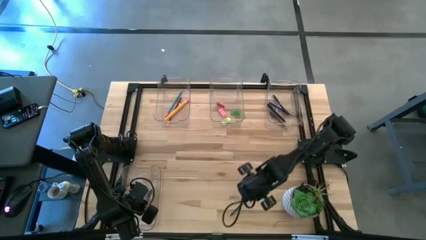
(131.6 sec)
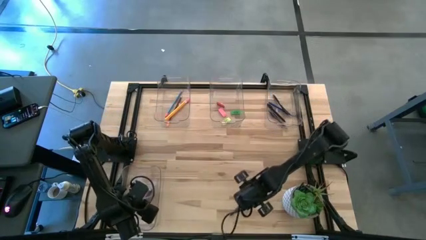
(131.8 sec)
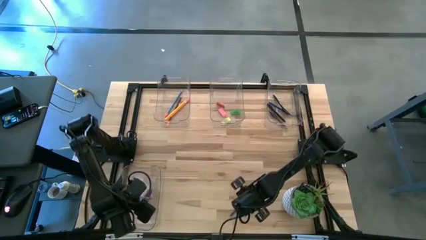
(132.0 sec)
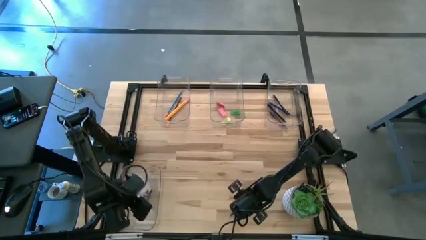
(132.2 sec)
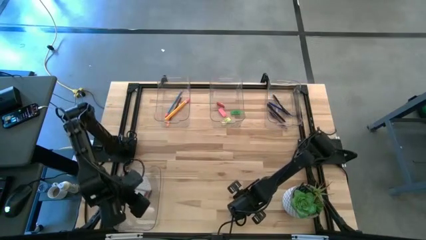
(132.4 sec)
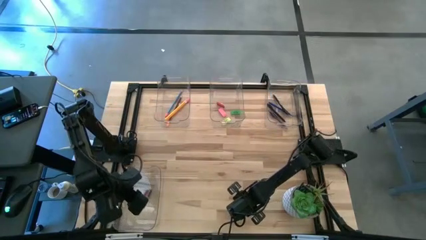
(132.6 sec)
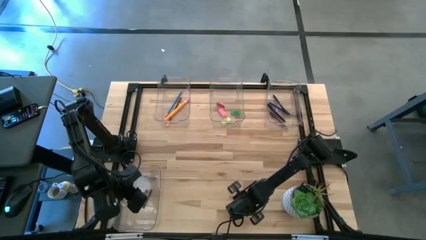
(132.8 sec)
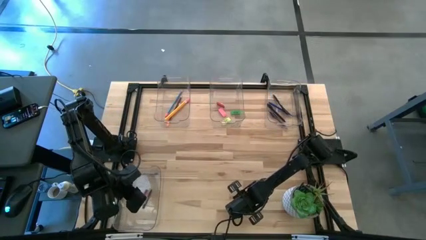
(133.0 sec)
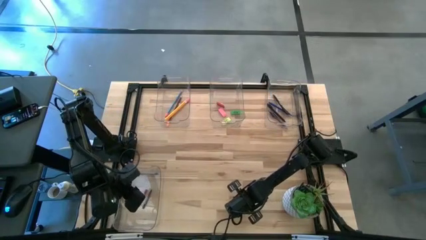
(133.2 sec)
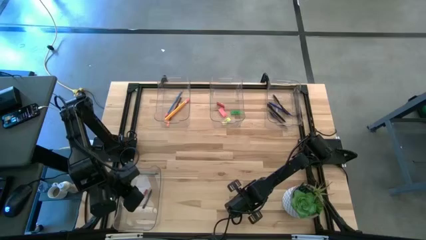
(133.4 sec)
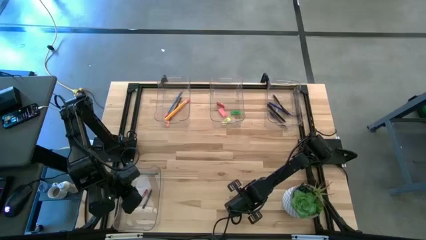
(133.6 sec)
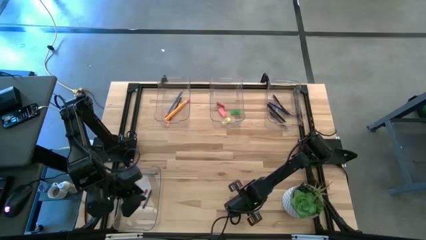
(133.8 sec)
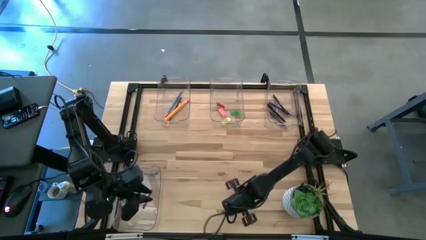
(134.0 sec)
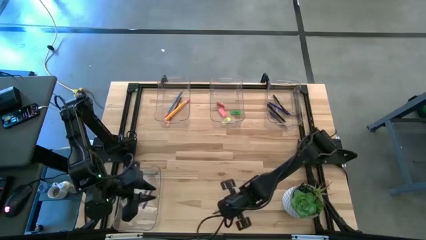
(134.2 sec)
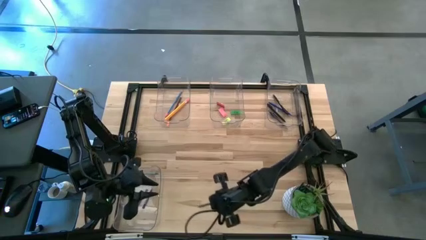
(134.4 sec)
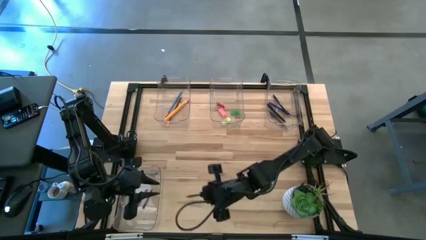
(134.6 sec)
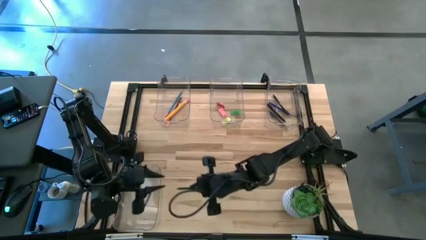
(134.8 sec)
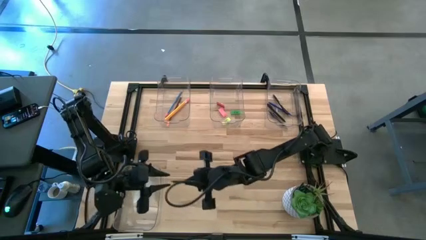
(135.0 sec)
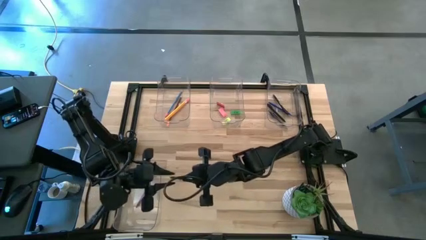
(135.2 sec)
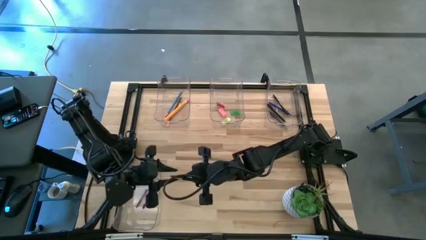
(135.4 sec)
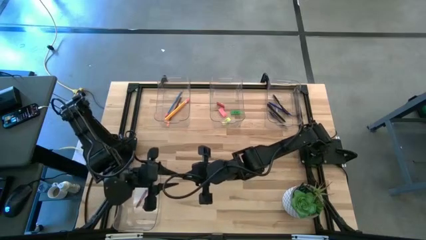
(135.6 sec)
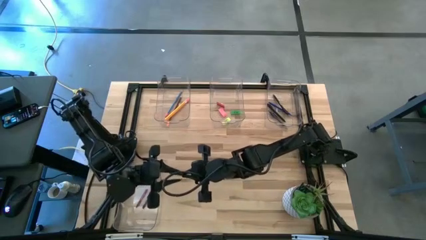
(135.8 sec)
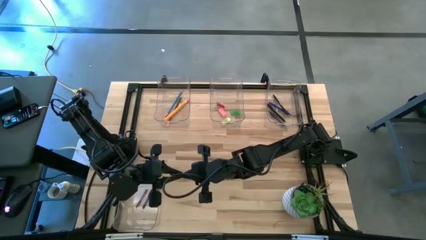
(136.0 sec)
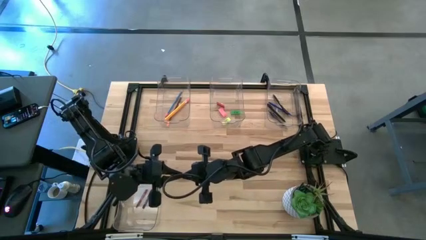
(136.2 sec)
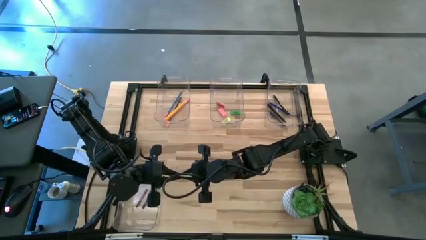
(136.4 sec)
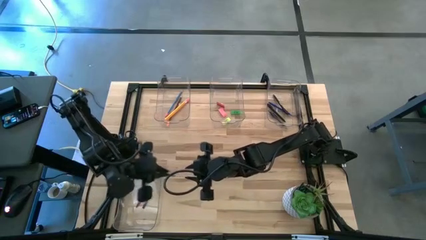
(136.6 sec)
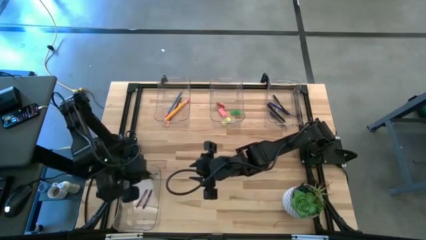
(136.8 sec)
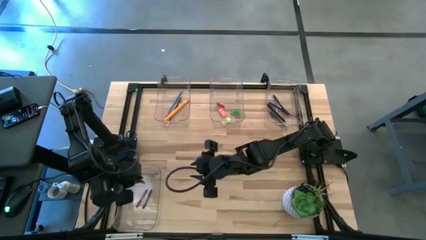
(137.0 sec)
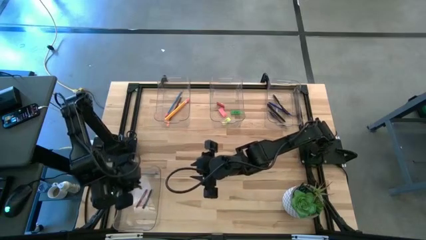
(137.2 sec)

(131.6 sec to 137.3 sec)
Task: Sort crayons/erasers/pens/pencils in bins
Put the green crayon into the bottom transparent bin

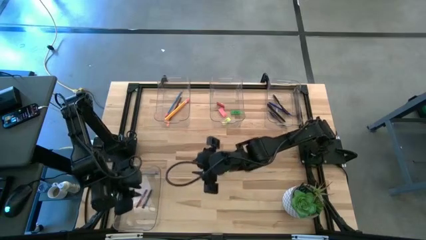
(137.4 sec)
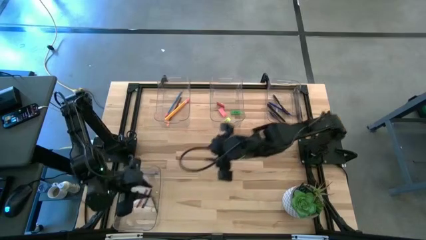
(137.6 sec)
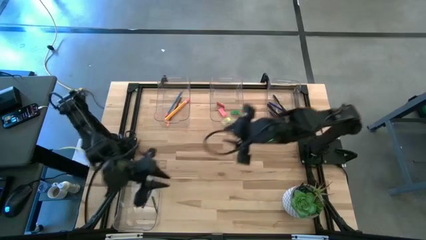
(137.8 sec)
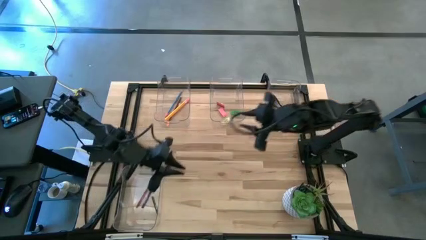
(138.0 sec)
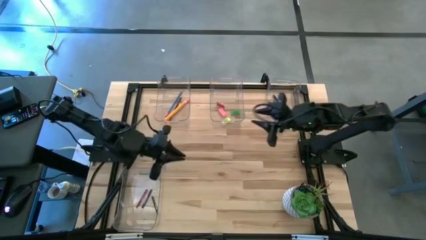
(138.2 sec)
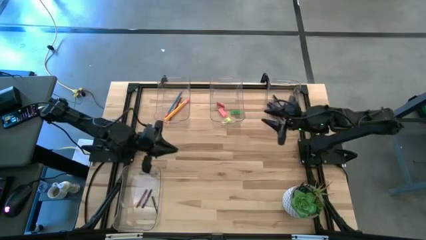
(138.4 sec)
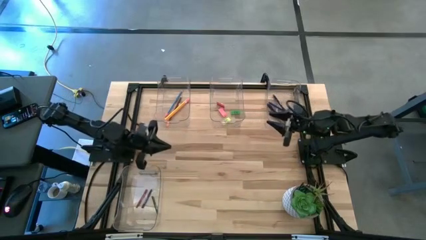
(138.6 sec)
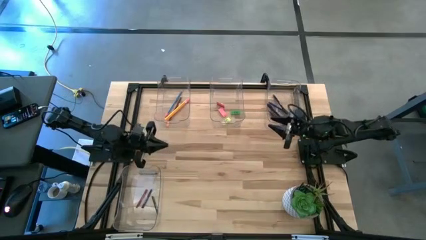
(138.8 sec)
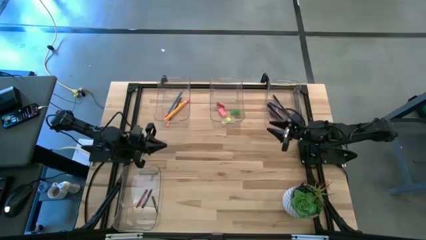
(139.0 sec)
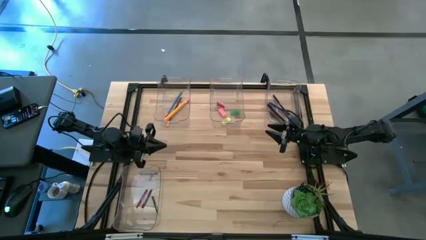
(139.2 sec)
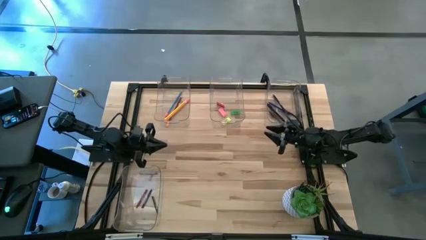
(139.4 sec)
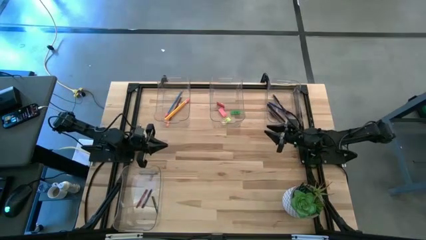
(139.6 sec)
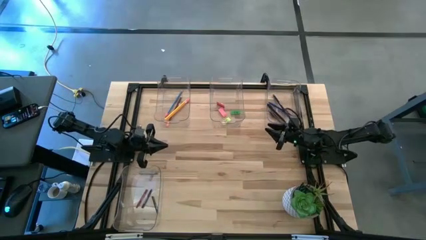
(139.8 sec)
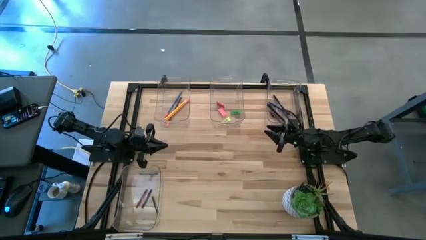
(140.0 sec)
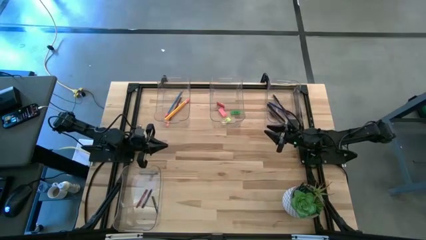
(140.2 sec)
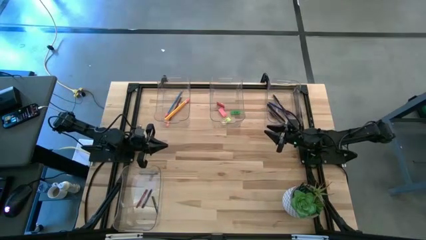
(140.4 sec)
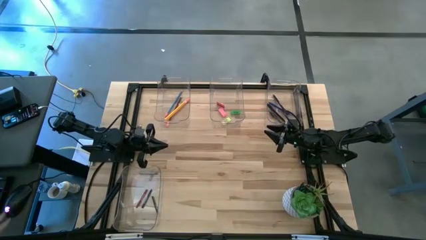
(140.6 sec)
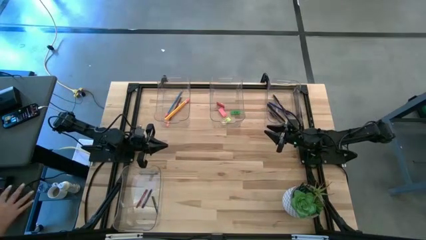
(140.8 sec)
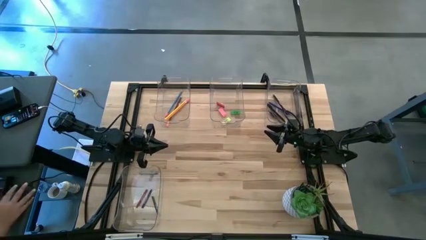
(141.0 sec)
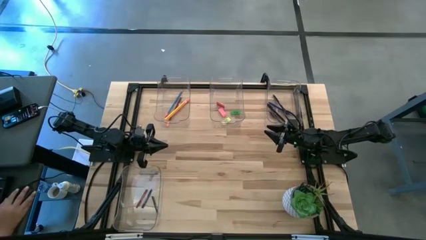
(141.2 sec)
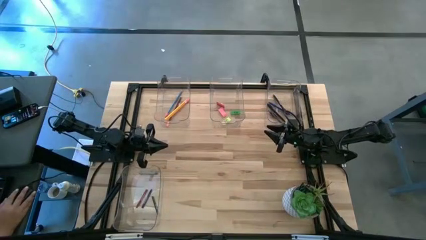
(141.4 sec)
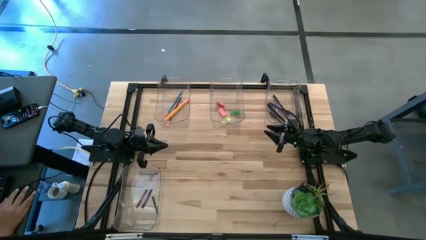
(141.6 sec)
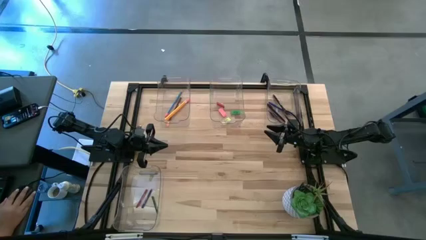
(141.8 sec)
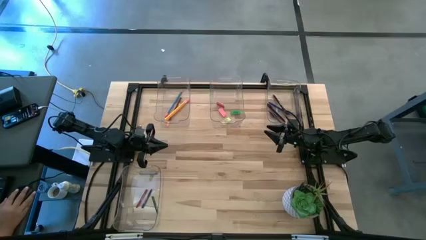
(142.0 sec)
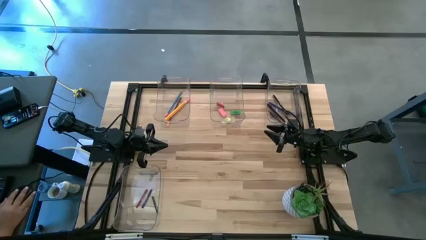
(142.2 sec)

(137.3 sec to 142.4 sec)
Return to Home Position

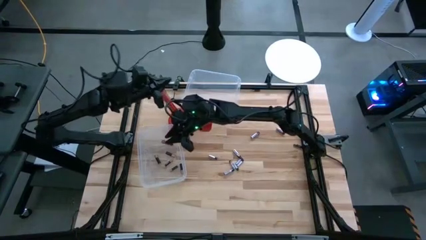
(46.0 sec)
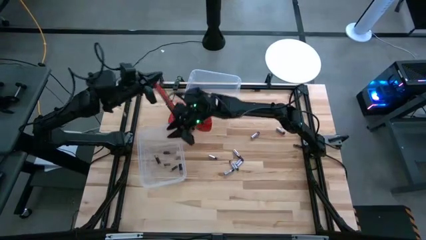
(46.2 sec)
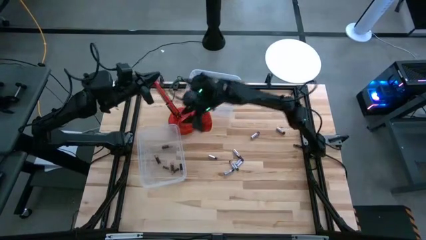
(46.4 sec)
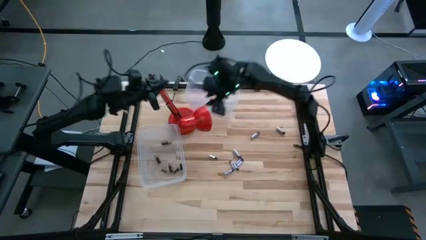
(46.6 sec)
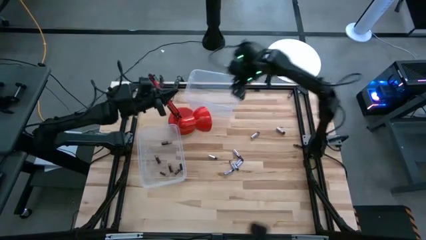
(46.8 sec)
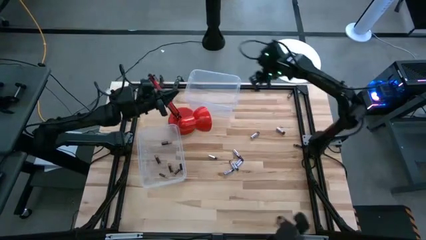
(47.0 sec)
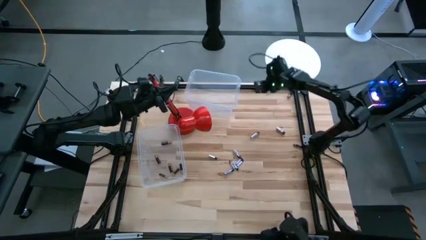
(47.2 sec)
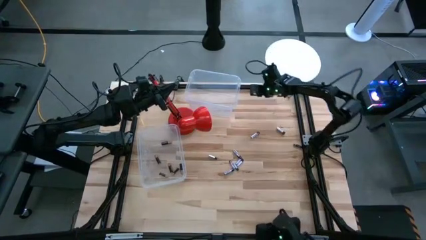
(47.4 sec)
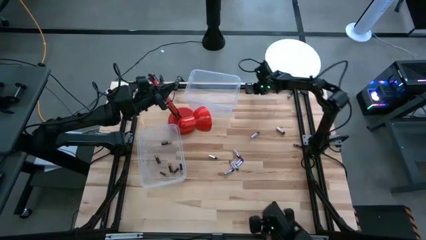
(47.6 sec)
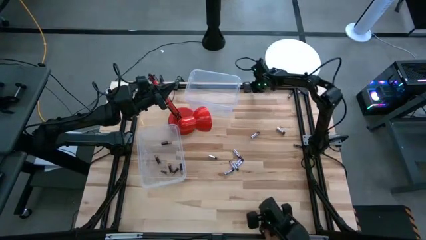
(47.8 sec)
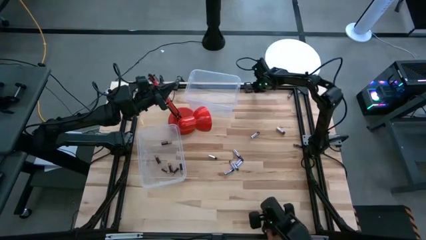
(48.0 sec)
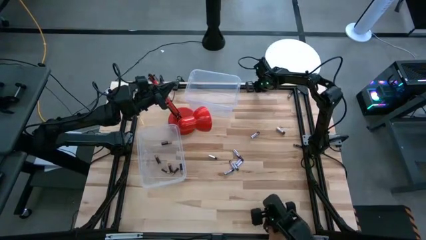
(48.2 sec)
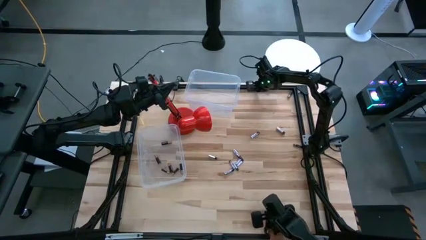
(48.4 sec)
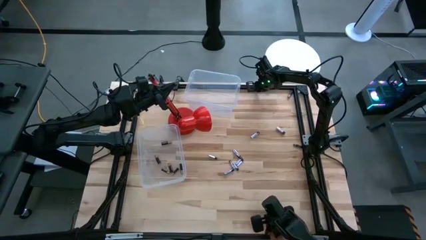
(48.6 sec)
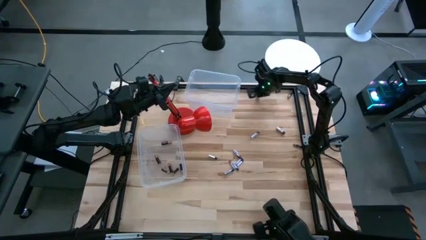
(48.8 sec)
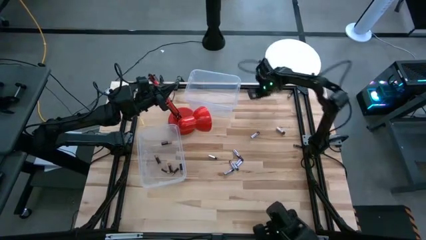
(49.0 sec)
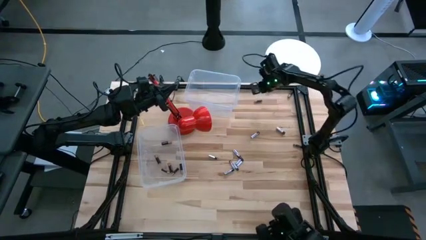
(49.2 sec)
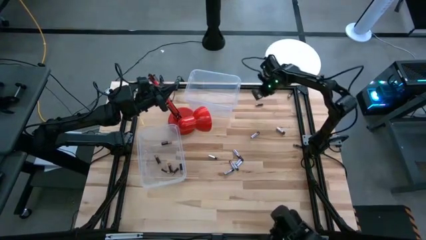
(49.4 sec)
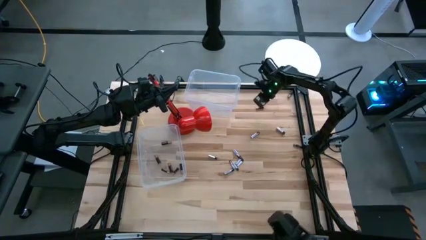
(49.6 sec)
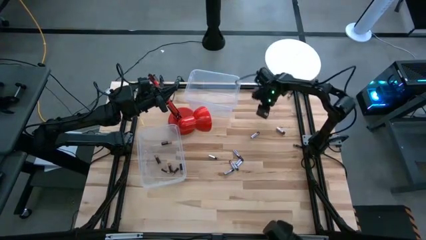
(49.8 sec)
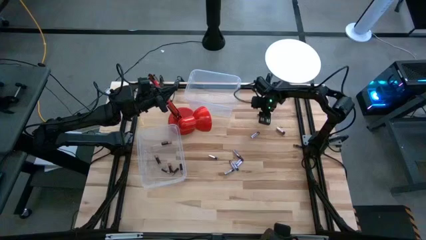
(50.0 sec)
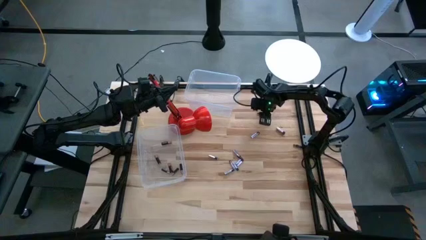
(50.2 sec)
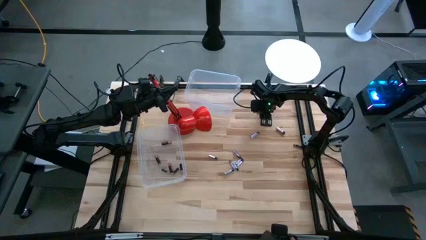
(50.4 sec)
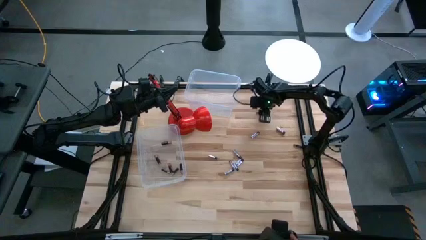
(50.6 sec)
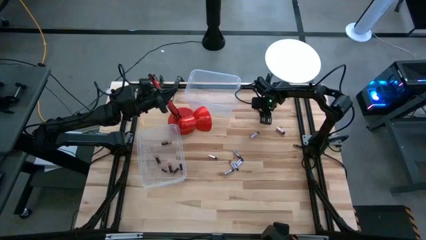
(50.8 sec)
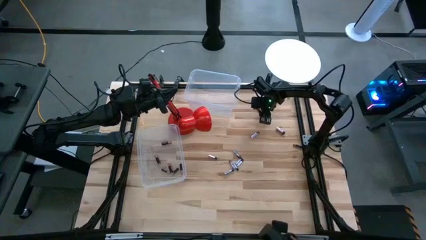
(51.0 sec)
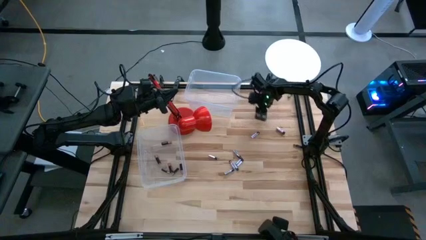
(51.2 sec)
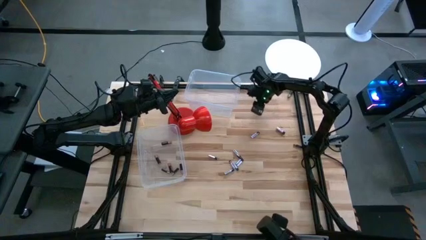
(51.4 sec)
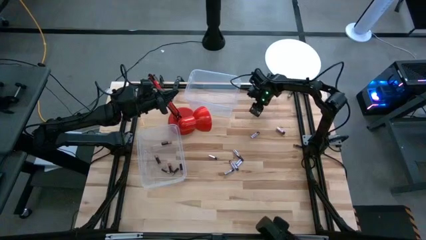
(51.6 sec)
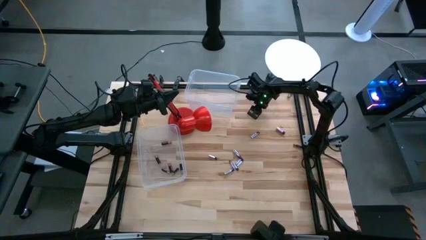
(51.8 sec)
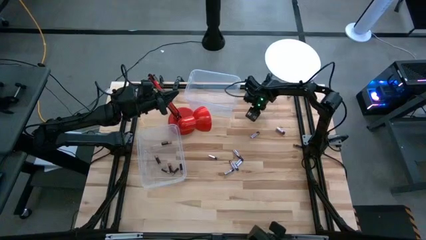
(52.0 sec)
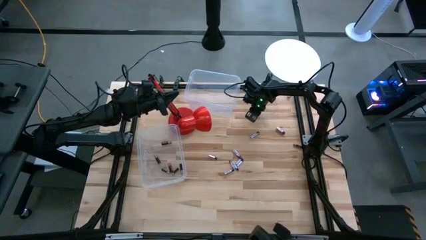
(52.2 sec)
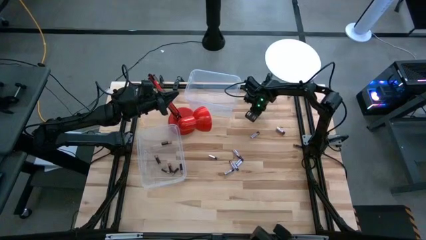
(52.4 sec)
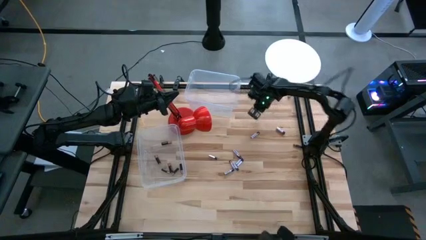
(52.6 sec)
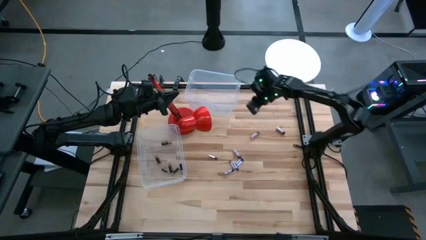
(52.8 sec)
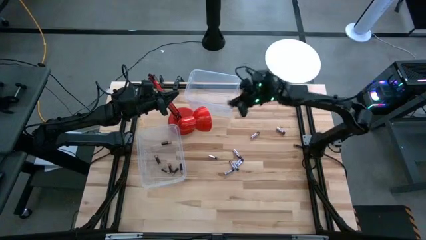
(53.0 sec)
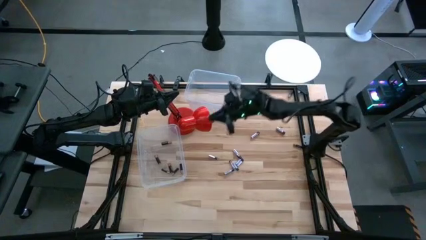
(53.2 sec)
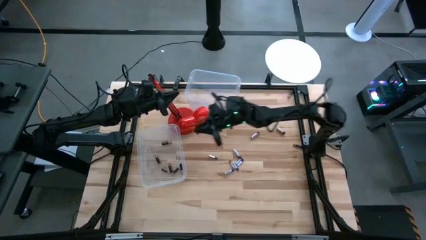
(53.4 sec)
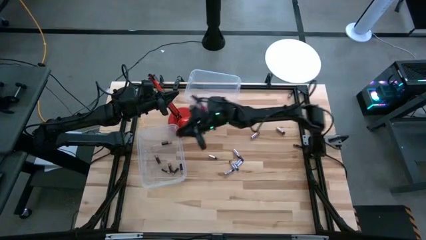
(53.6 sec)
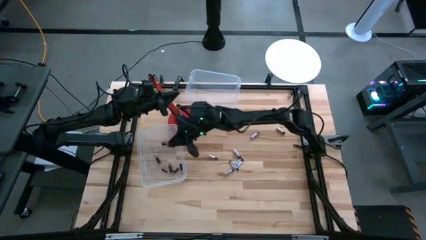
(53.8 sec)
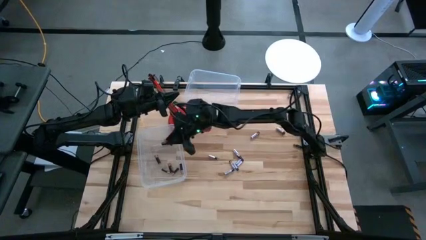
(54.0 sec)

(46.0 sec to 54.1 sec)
Task: Sort batteries
Put the black battery into the bottom transparent bin
